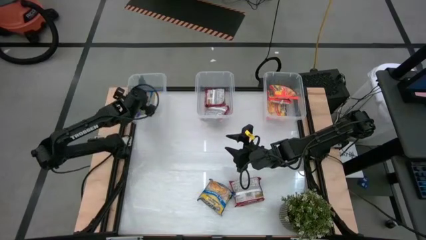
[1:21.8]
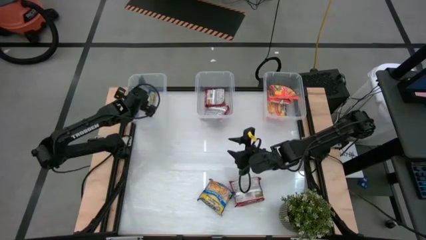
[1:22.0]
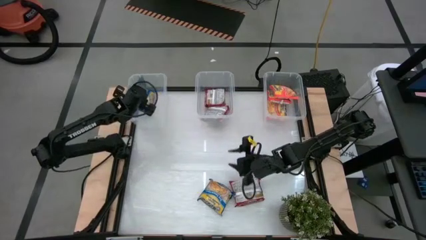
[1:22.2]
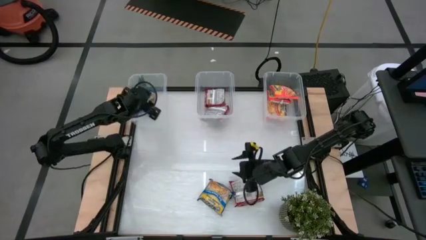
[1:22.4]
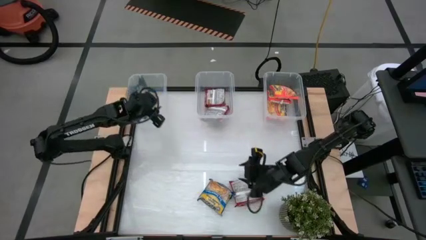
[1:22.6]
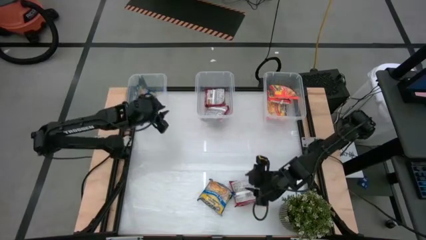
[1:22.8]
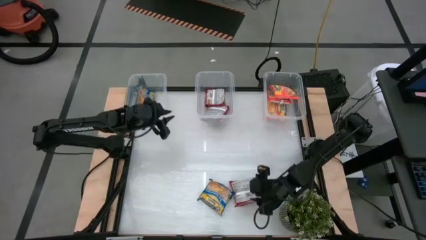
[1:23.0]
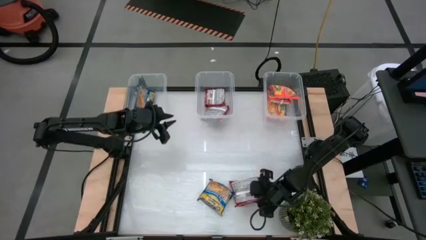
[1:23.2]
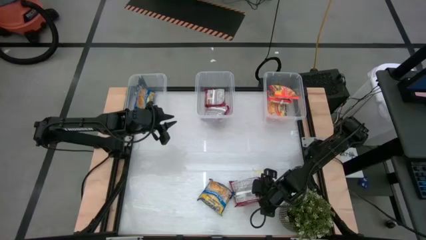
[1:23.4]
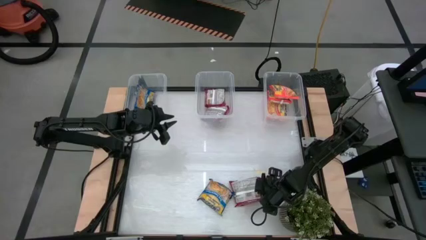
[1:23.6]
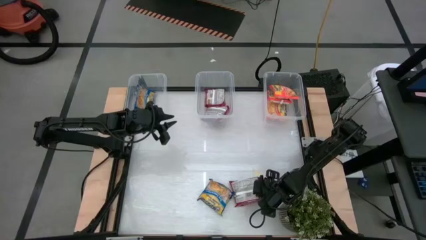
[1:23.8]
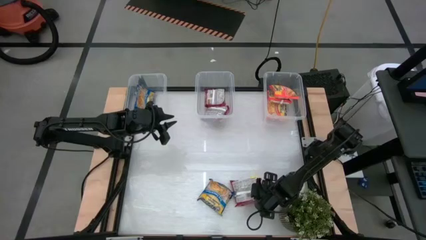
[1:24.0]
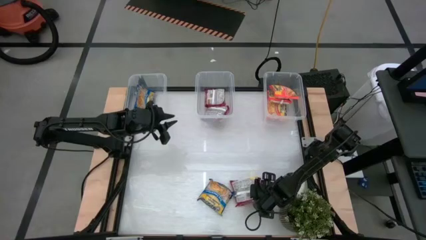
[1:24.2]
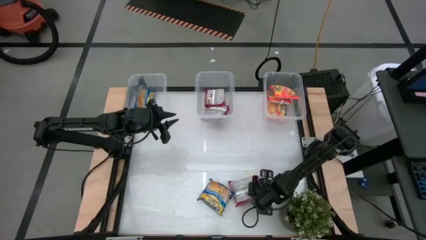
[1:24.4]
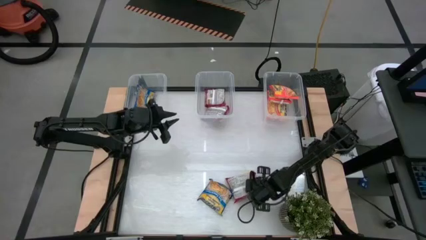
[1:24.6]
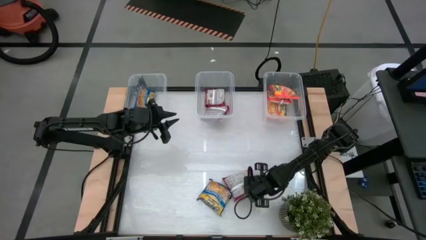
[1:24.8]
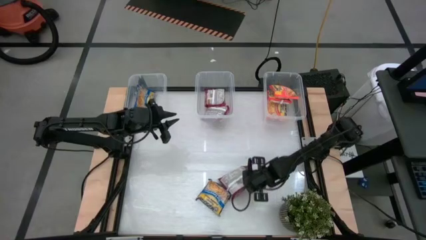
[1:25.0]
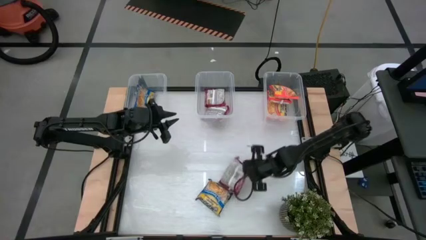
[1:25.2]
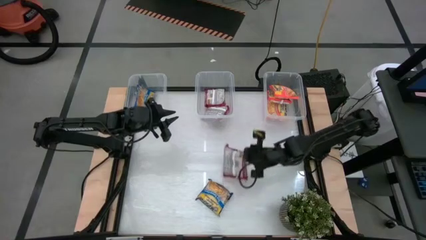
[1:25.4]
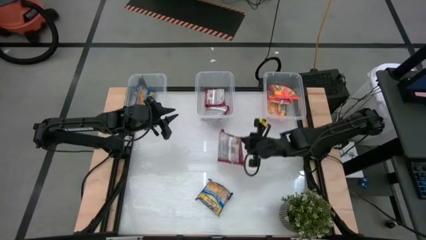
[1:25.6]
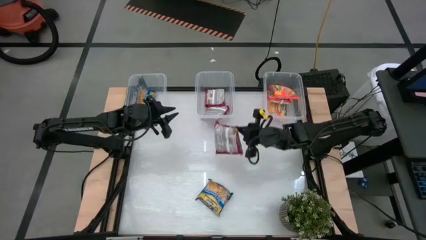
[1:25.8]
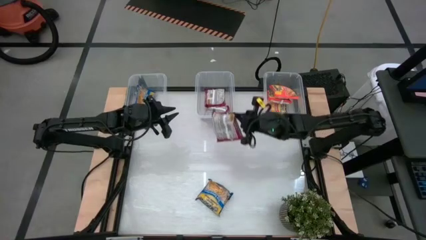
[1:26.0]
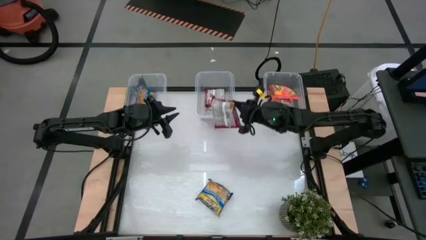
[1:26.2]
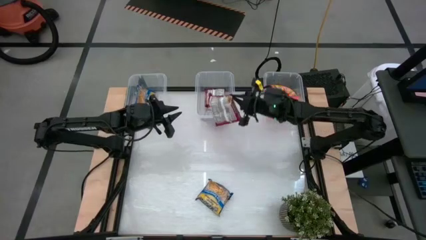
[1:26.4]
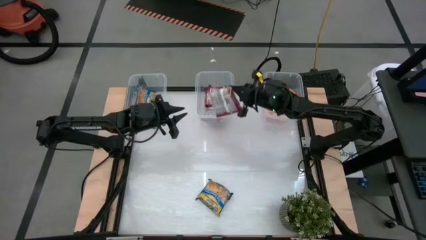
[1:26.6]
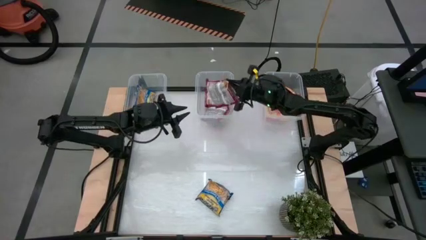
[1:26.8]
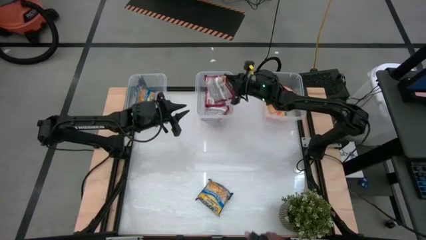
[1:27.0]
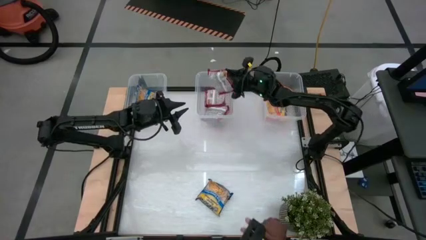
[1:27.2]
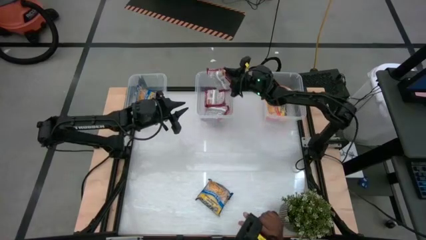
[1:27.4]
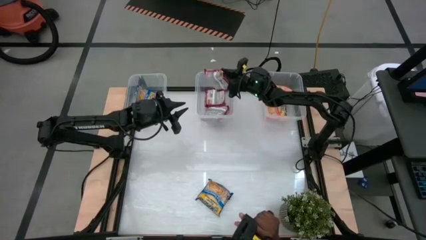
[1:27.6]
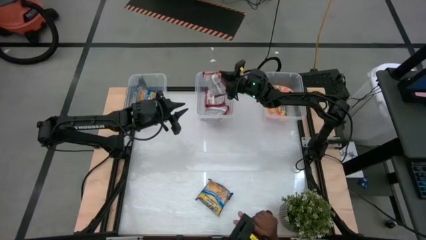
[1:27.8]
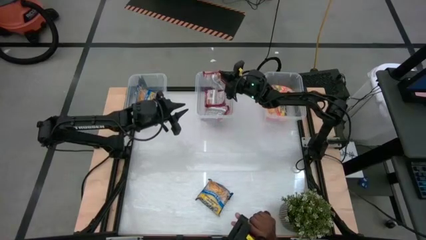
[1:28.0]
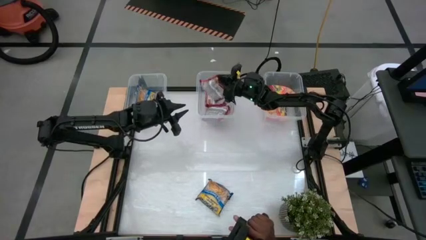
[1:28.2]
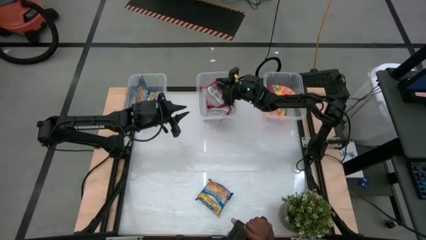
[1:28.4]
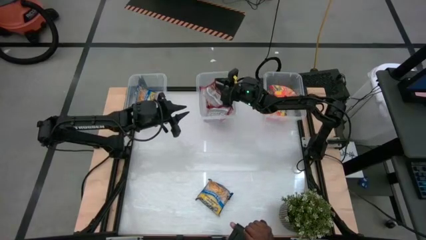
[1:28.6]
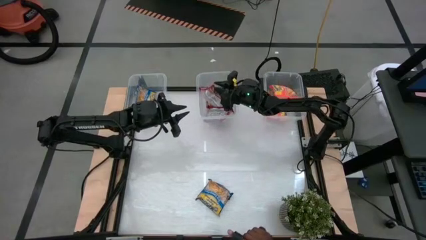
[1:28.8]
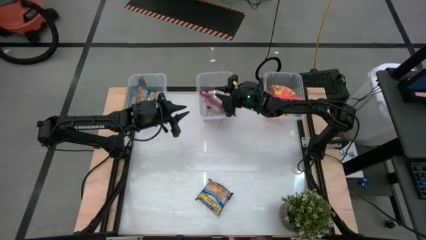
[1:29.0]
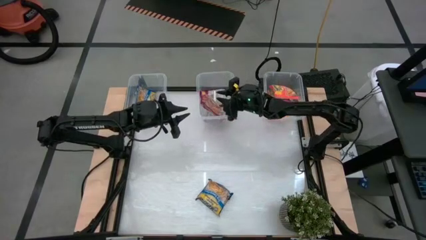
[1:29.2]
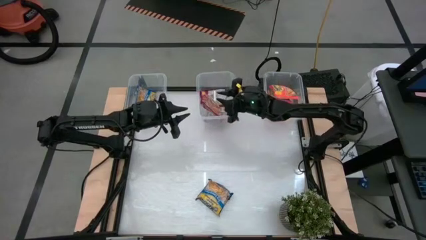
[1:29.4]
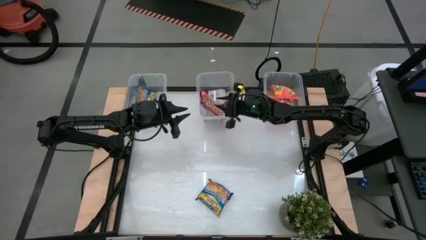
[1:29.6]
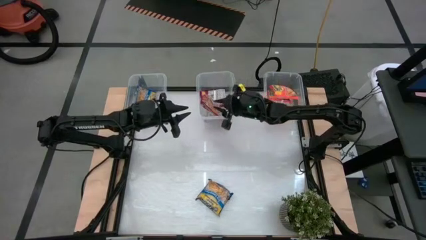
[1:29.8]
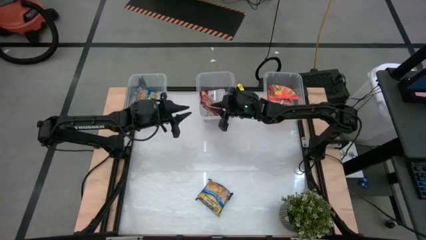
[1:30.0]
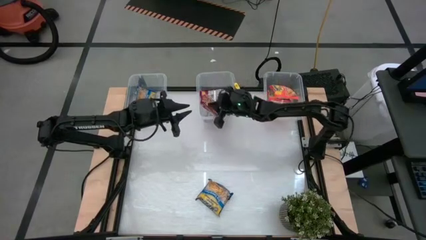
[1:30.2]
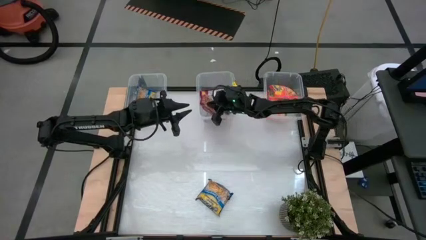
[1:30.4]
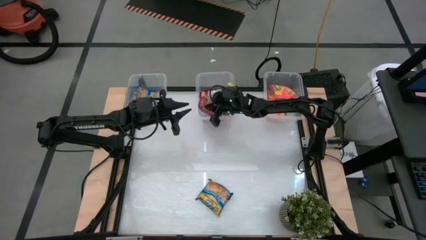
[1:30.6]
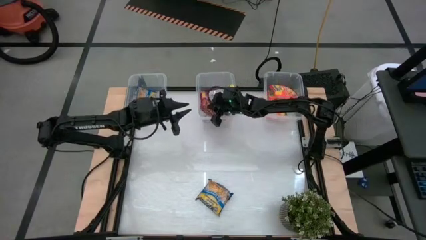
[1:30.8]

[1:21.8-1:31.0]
Task: Sort Maruchan noodles
Put the red noodle pack into the middle transparent bin

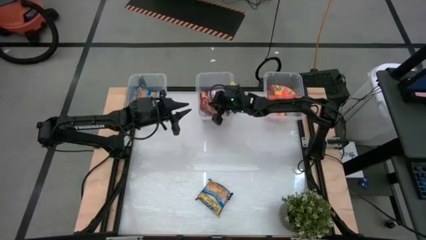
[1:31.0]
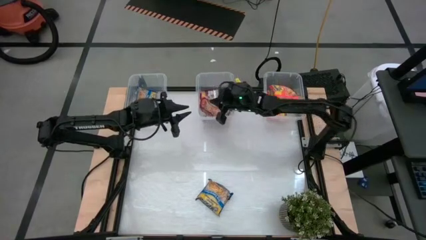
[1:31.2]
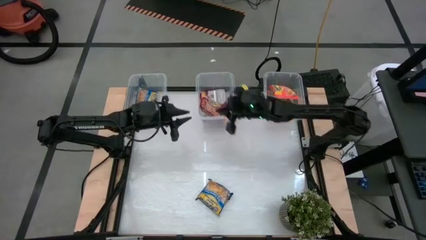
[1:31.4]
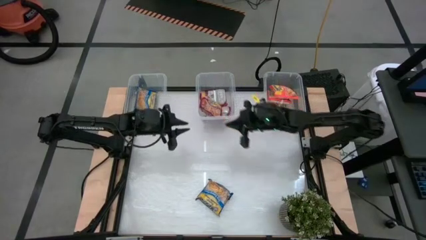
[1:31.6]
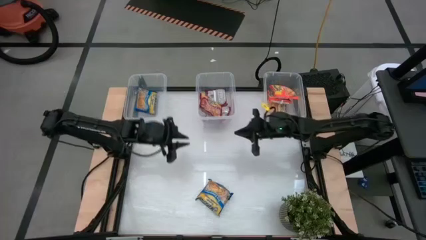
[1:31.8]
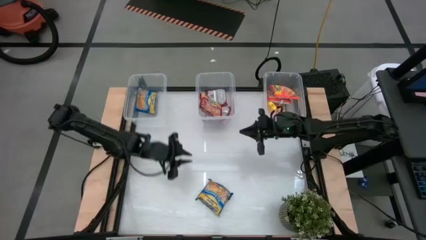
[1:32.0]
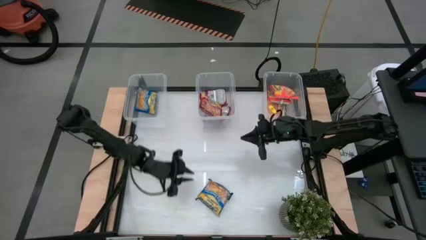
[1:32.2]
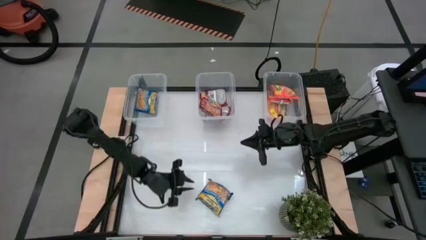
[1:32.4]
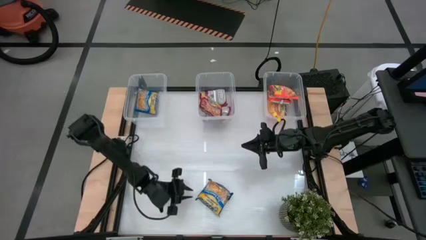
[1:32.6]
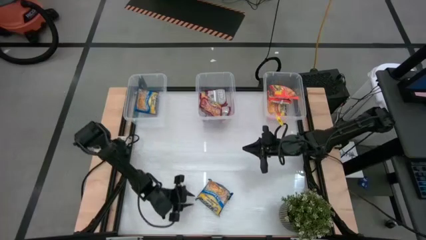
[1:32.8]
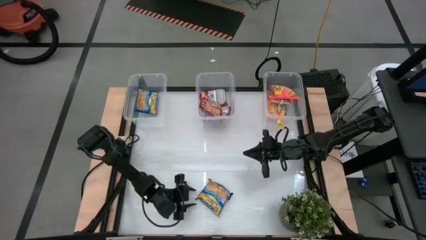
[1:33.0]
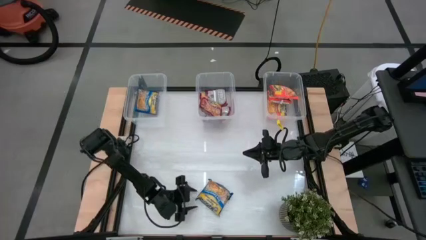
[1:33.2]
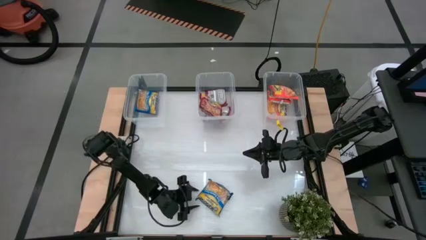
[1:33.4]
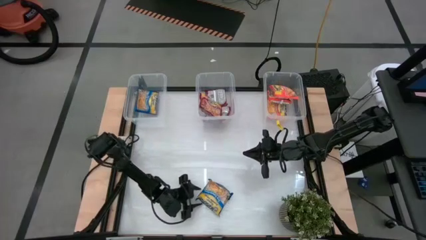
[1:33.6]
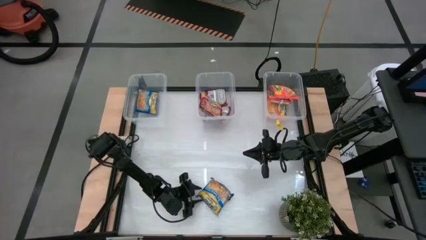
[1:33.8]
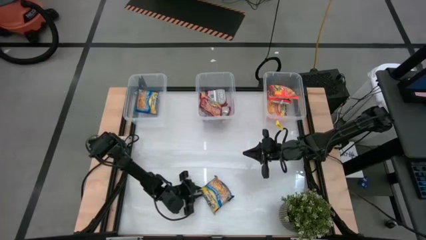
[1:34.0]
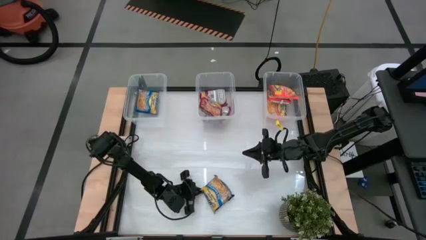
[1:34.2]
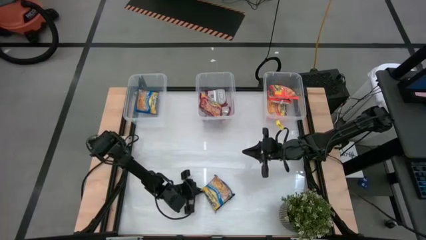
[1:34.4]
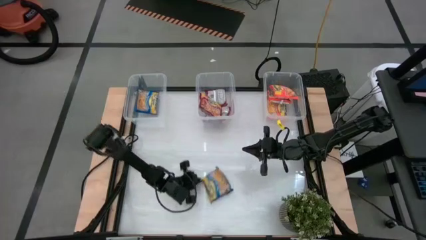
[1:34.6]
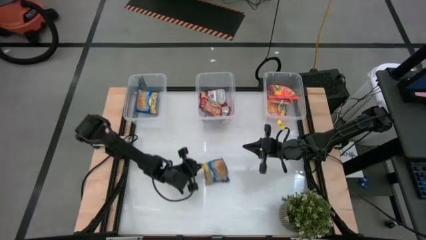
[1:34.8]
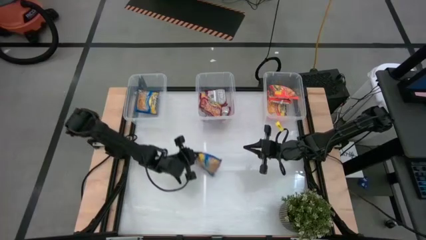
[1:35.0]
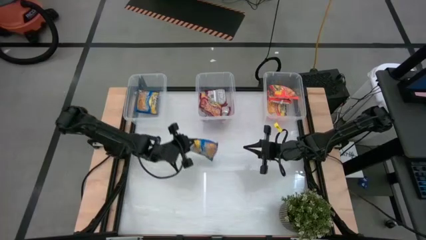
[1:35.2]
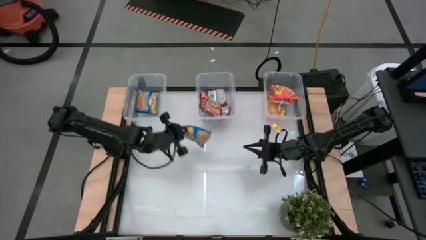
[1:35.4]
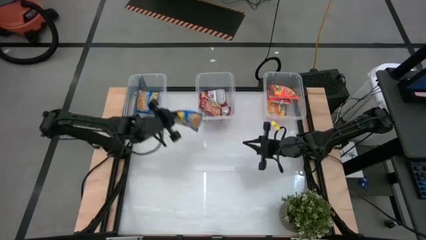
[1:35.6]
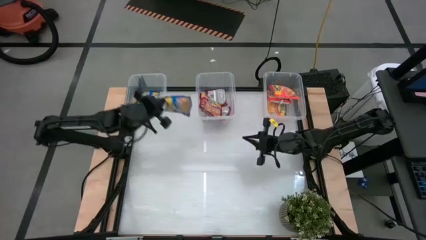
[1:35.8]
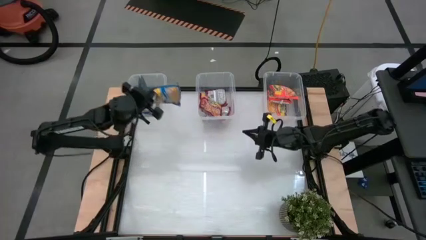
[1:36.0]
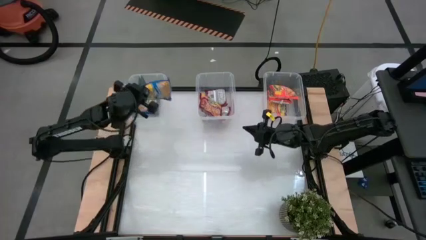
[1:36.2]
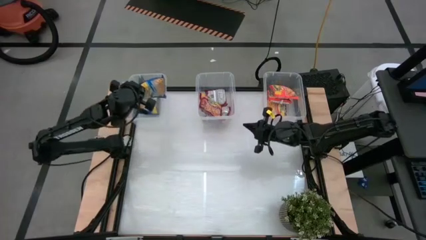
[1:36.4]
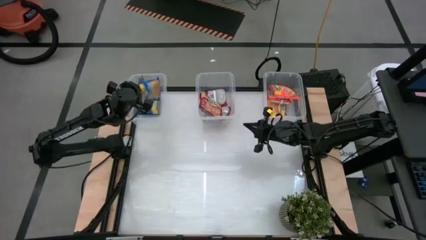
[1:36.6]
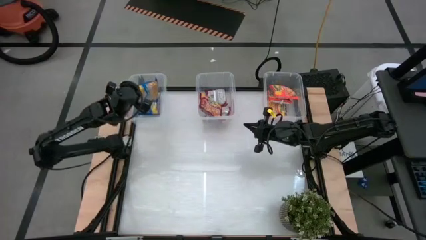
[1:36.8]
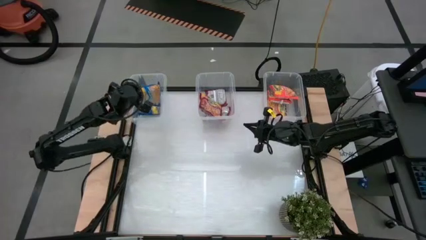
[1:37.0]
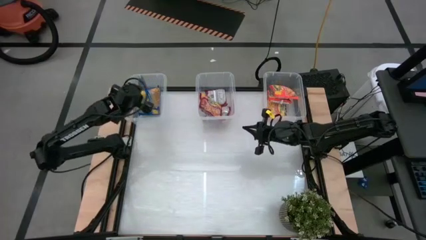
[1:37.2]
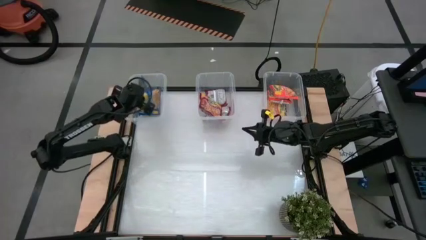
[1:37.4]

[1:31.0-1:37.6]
Put the blue noodle pack into the left transparent bin
